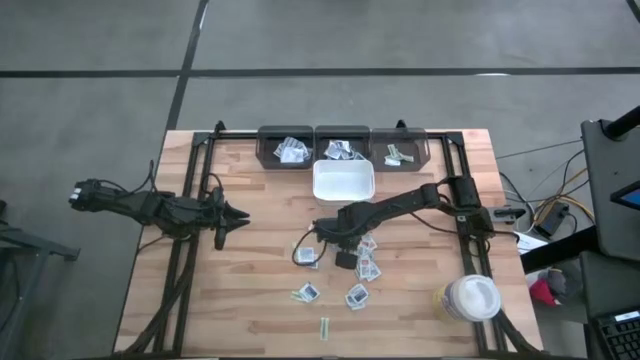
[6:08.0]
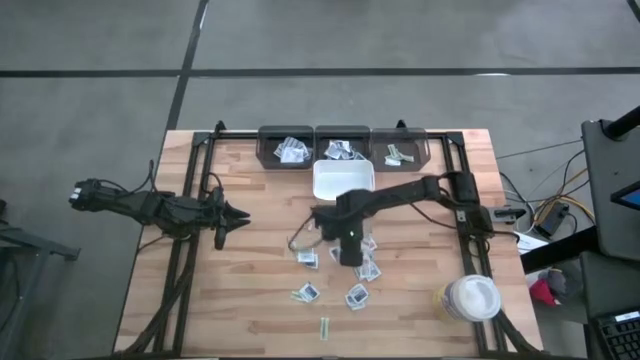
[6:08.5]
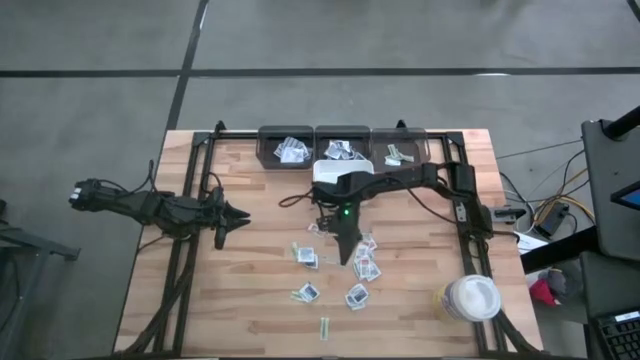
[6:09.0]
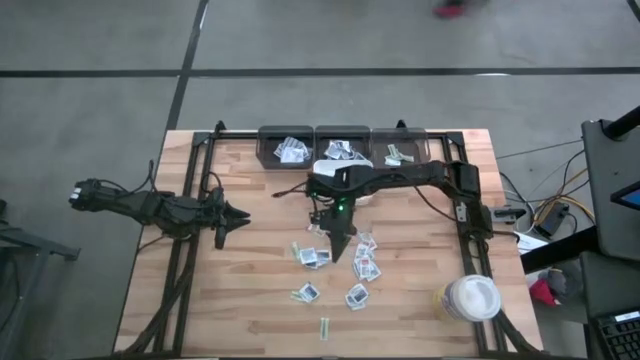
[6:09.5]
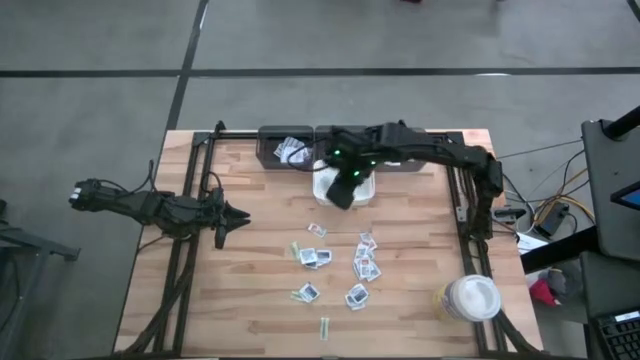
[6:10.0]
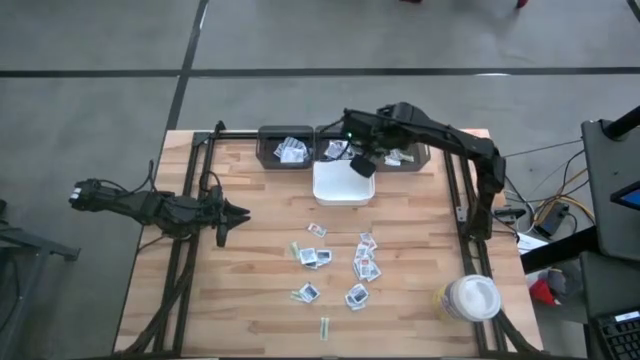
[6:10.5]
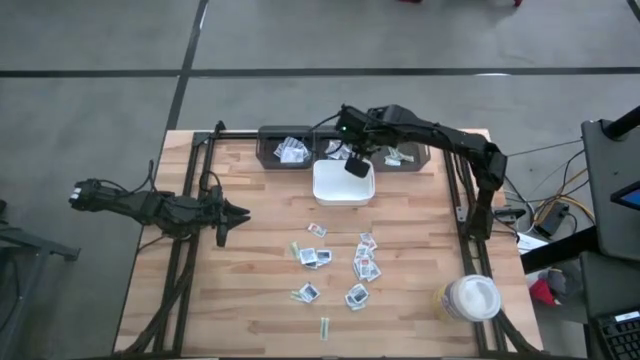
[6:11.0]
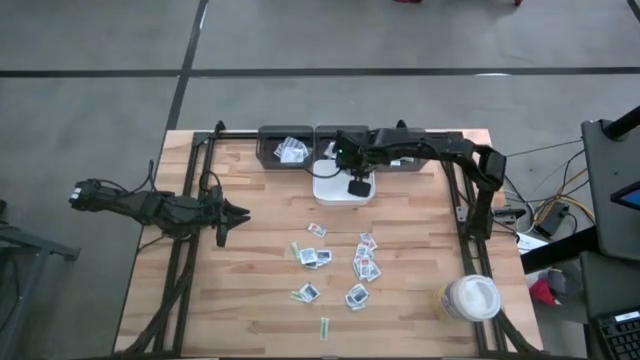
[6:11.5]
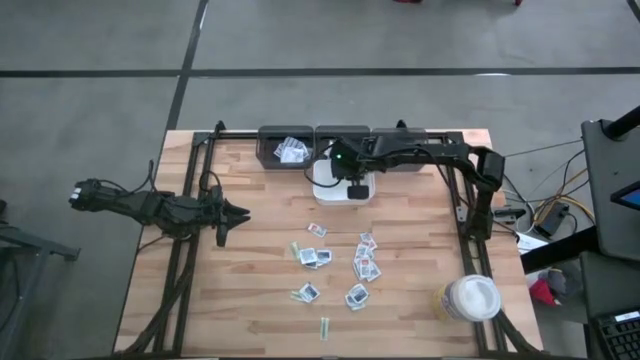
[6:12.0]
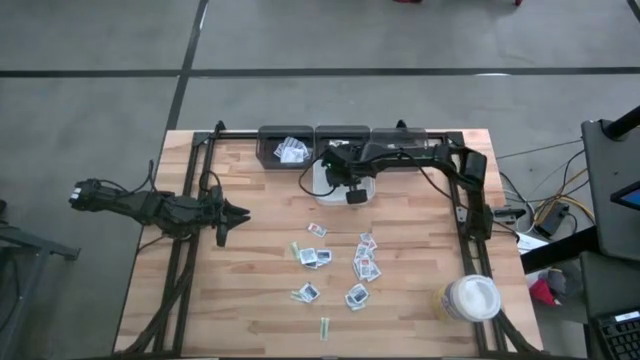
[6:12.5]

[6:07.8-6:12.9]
Task: Pick & Place First Aid Supplies
Put the orange ointment pack into the white bin

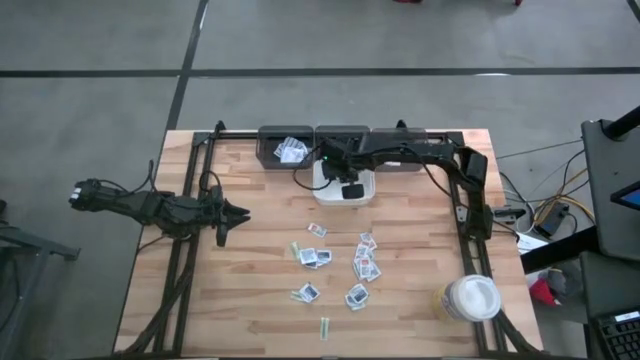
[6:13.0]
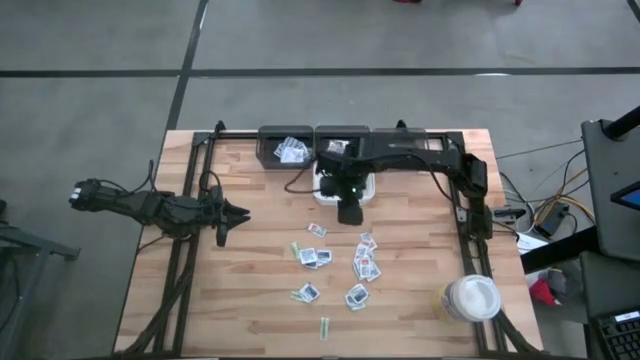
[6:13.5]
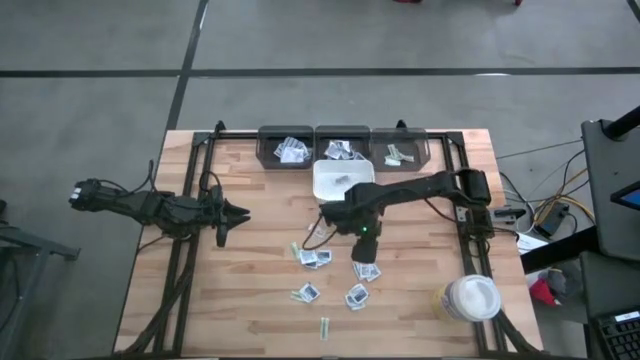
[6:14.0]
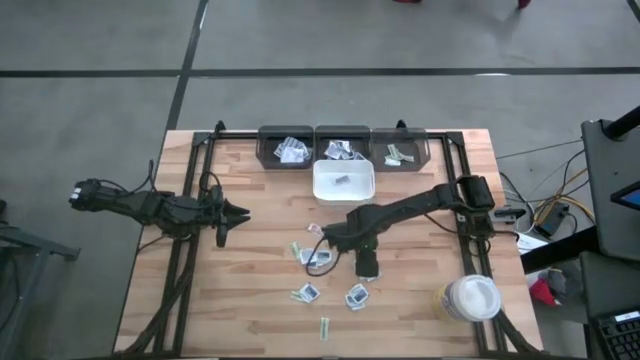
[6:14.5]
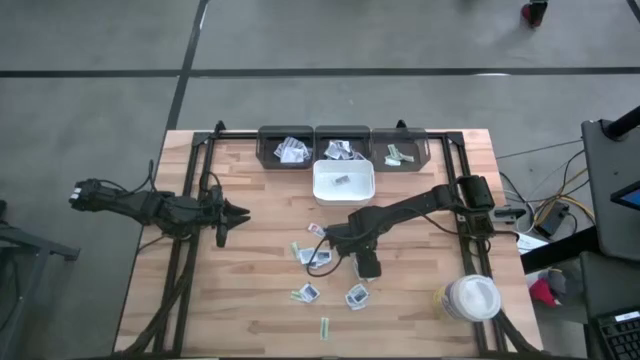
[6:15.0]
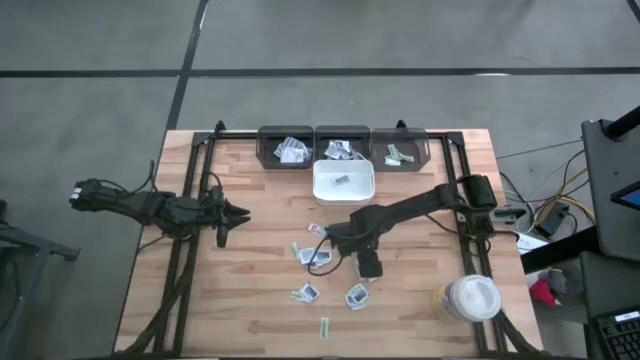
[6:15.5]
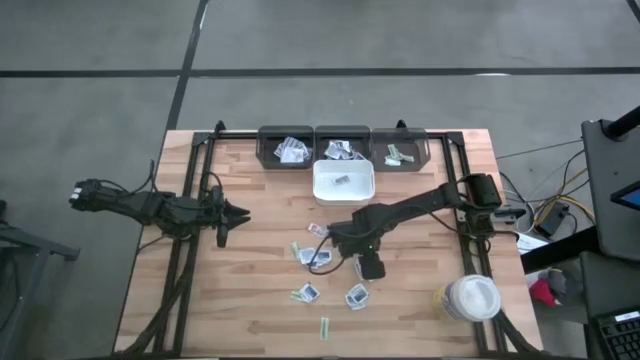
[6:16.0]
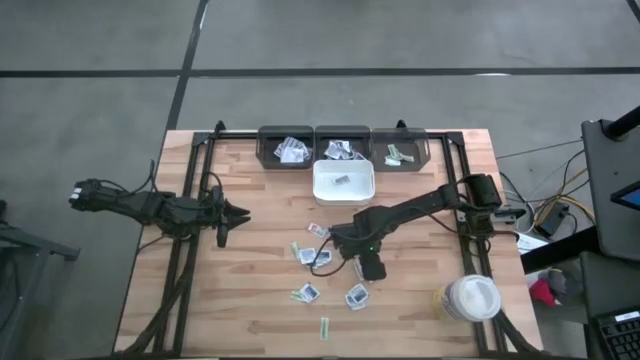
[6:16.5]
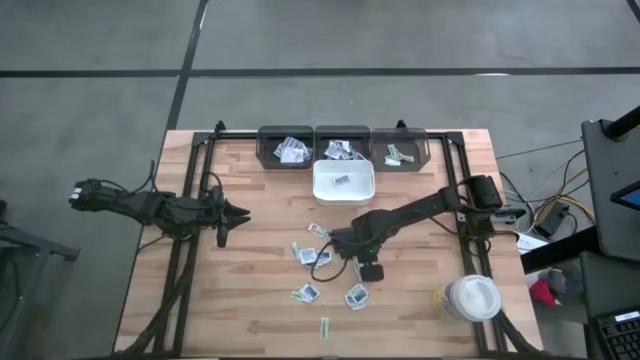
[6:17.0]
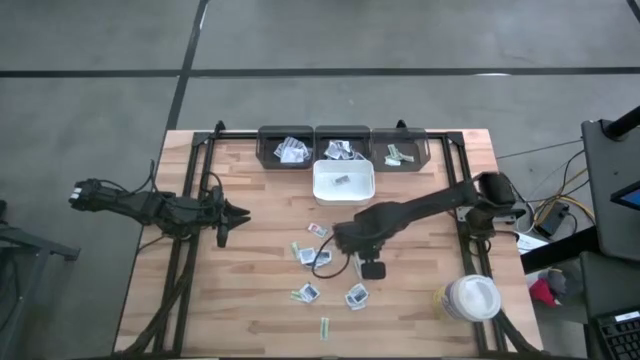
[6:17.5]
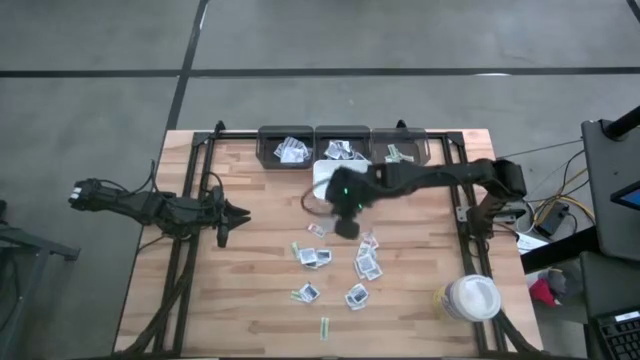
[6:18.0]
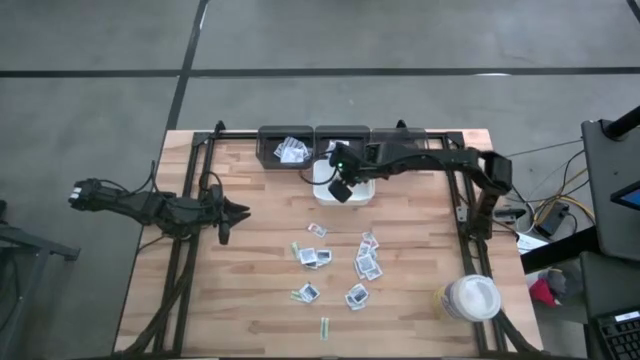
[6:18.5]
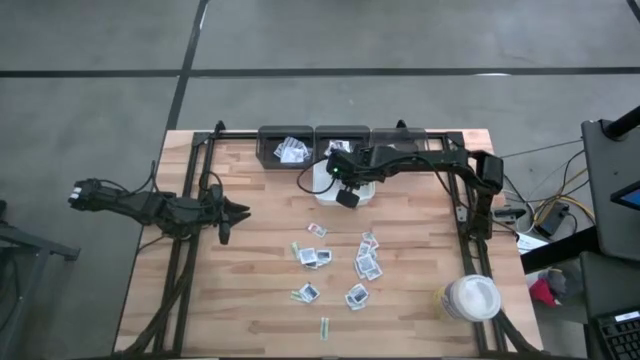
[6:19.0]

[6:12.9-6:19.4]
Put the orange ointment pack into the white bin

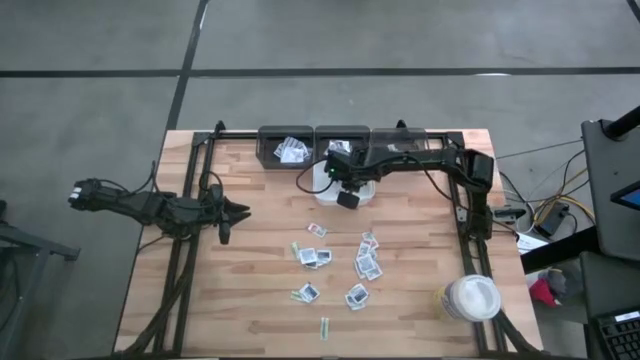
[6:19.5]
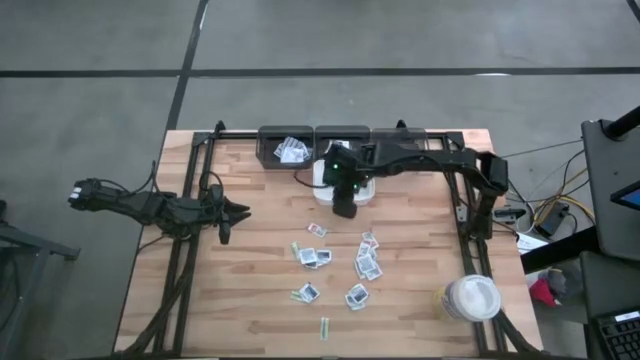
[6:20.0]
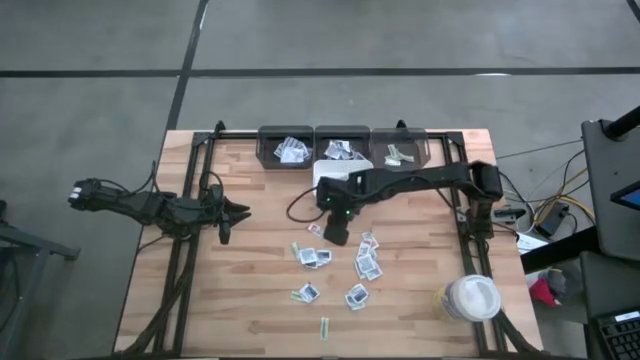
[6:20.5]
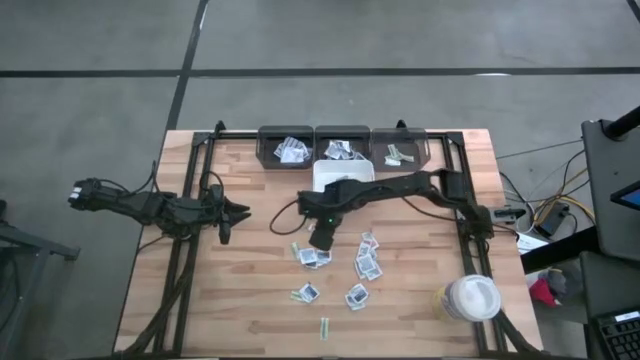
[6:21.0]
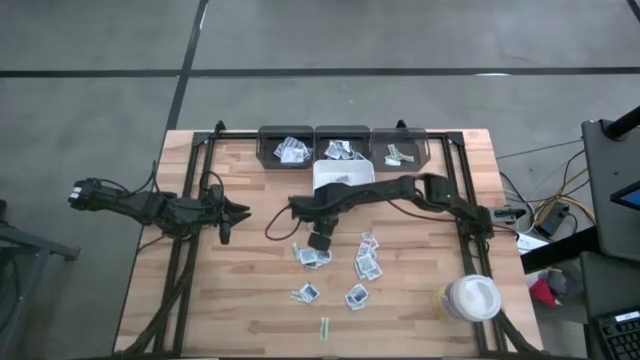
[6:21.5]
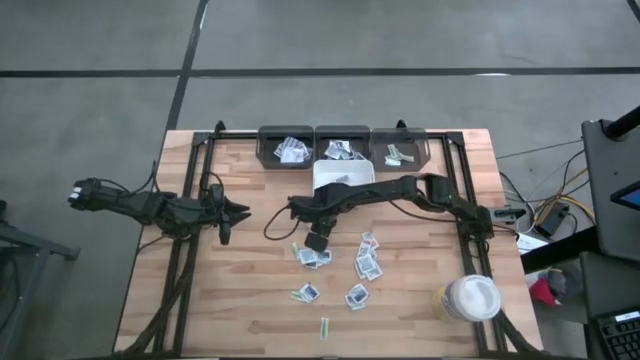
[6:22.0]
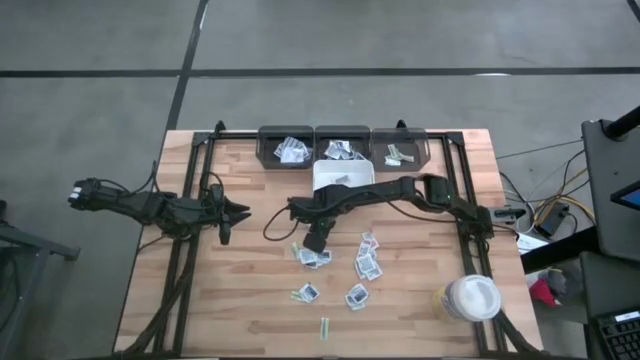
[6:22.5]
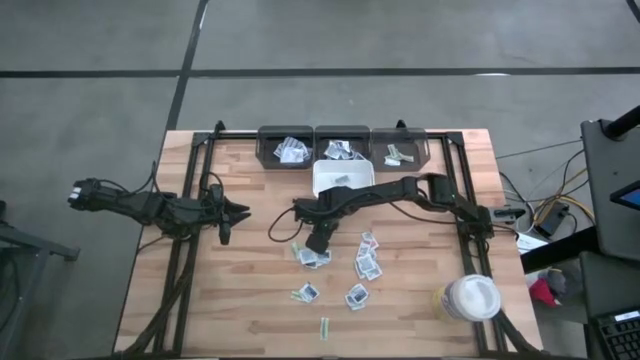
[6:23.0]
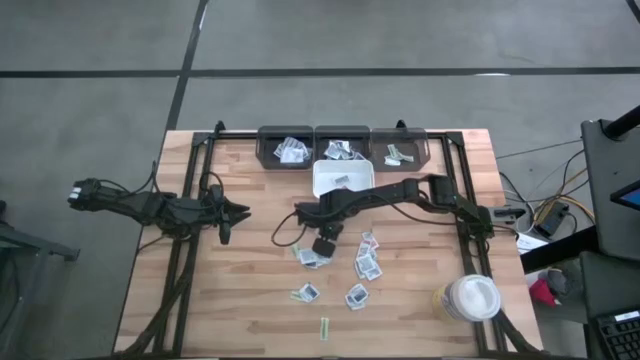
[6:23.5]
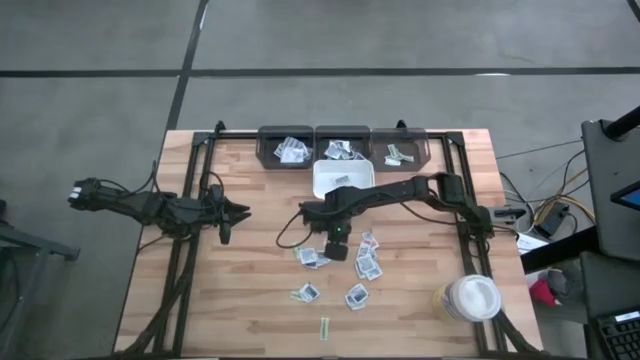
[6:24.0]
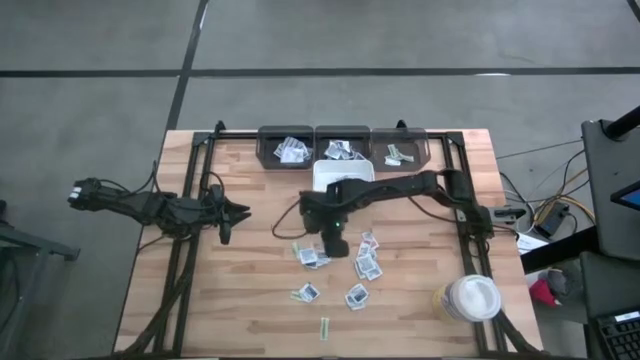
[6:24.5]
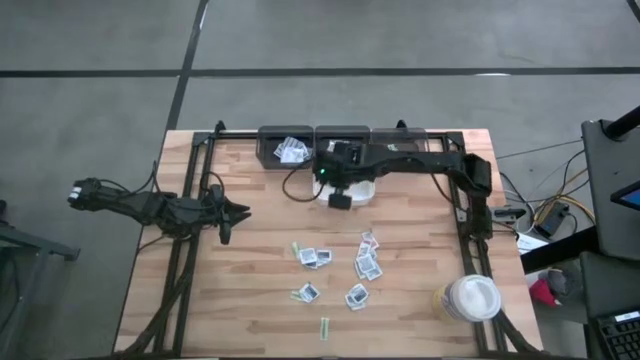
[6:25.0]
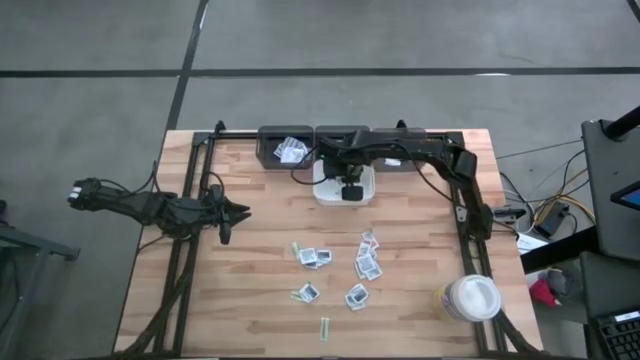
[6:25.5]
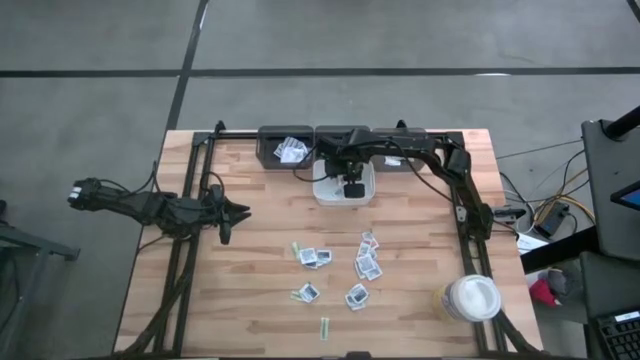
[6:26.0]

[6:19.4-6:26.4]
Put the orange ointment pack into the white bin

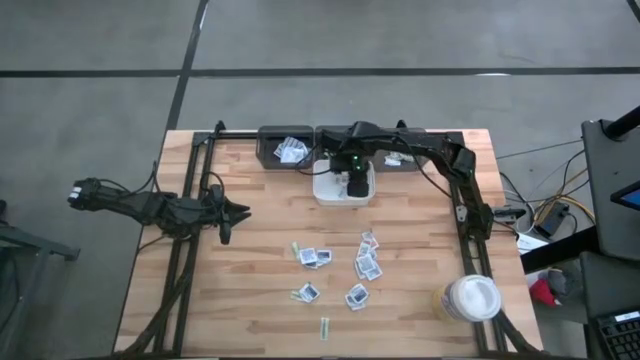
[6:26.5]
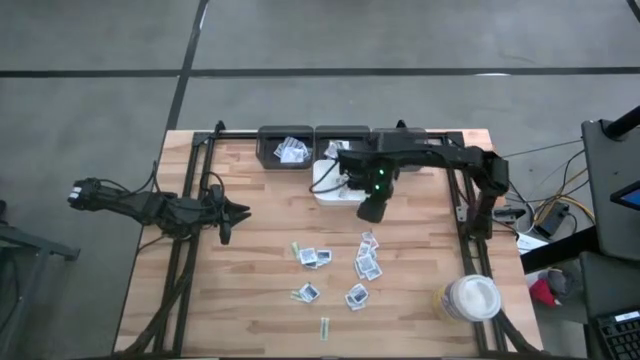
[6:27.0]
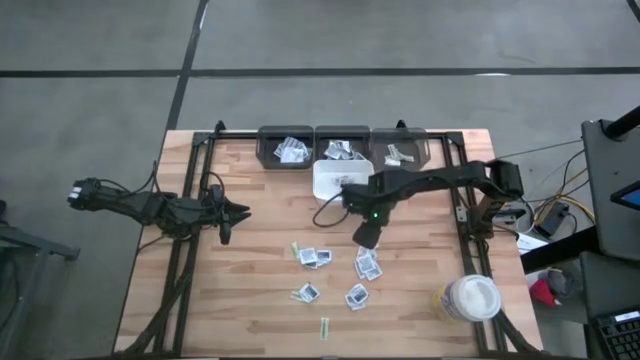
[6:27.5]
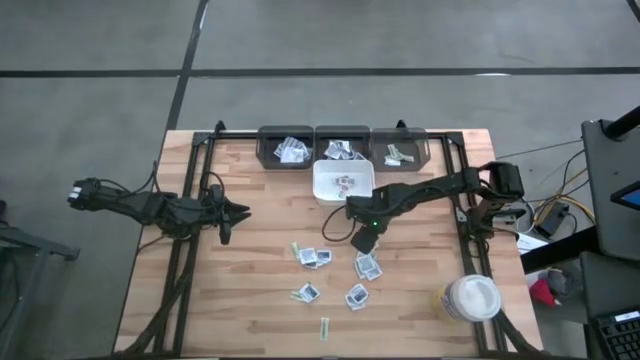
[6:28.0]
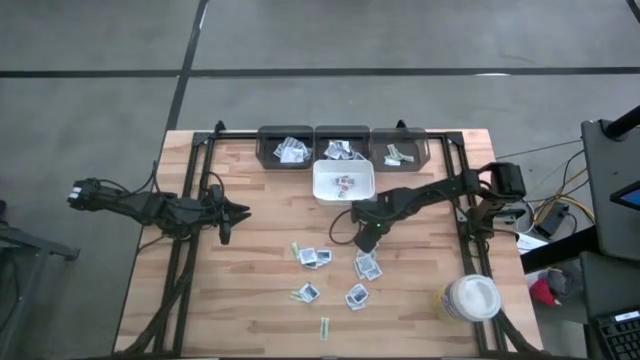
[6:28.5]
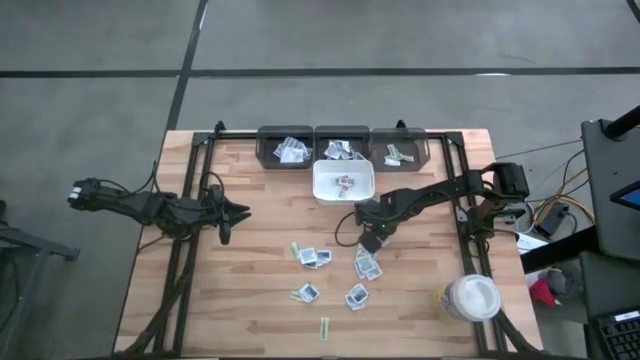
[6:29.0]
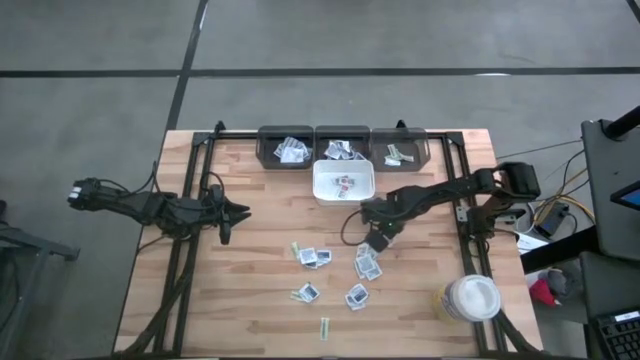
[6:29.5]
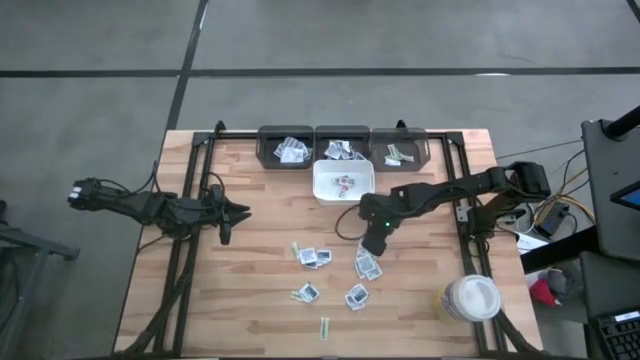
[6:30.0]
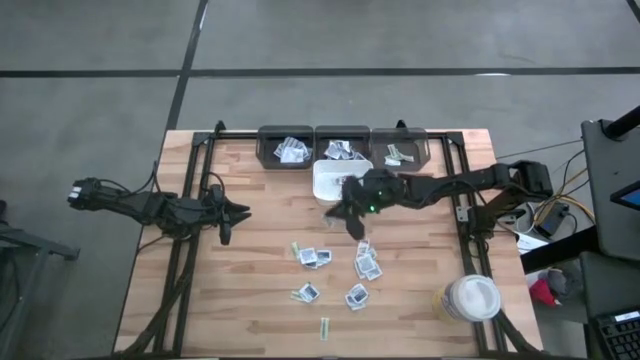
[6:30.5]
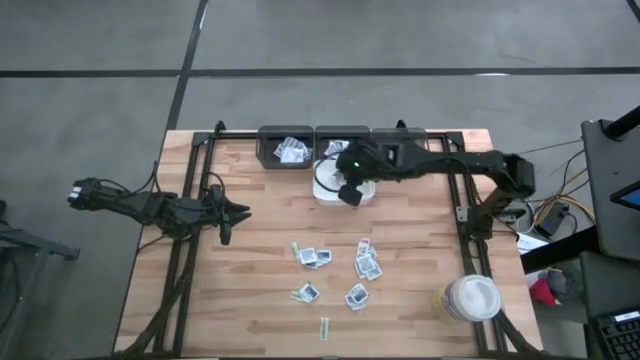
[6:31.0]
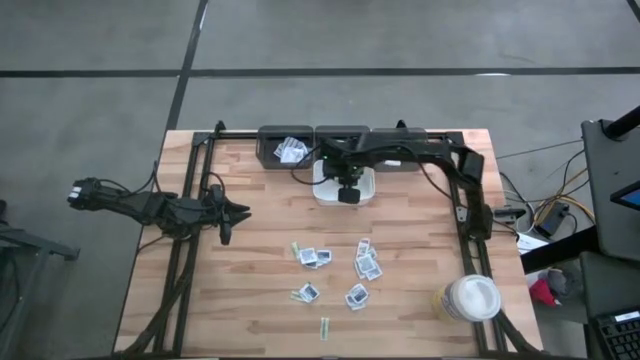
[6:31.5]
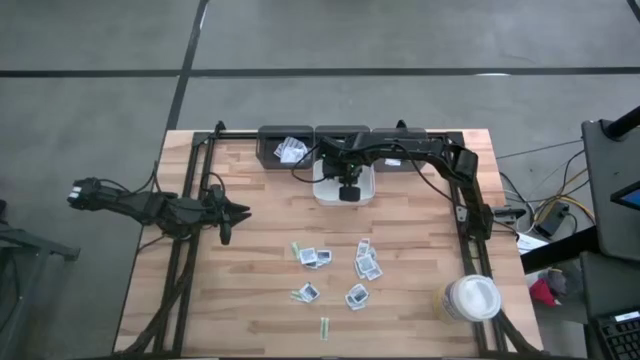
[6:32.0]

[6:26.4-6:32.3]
Put the orange ointment pack into the white bin
